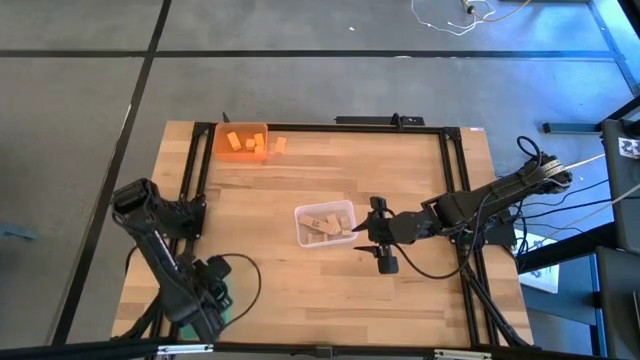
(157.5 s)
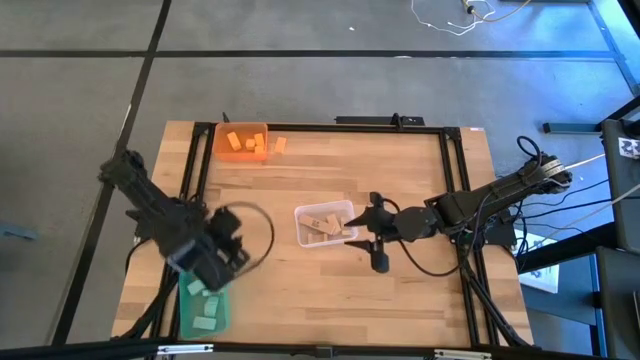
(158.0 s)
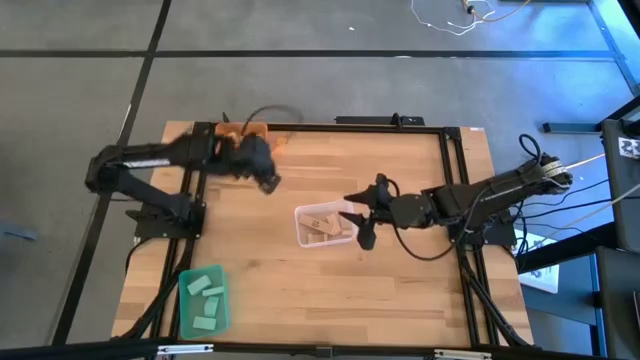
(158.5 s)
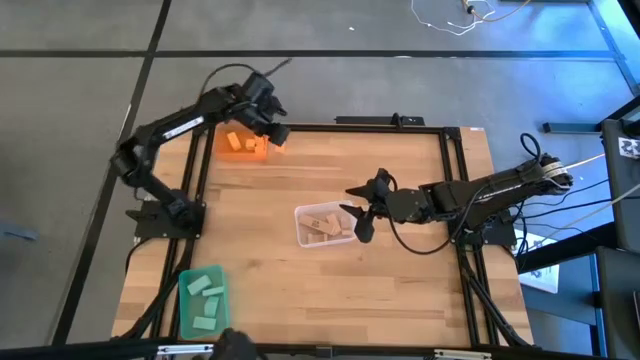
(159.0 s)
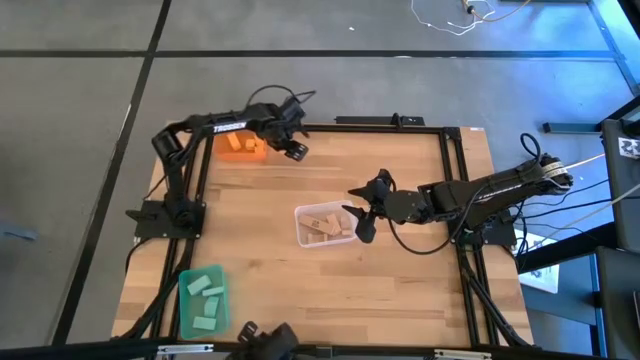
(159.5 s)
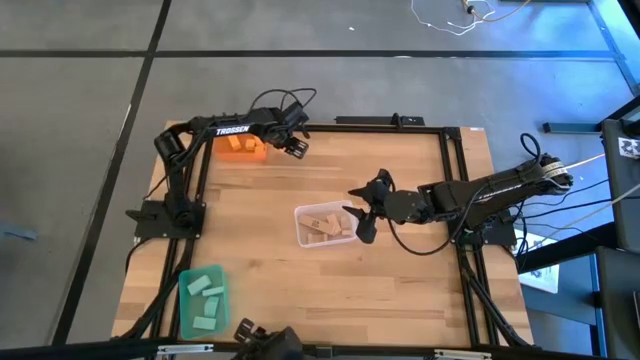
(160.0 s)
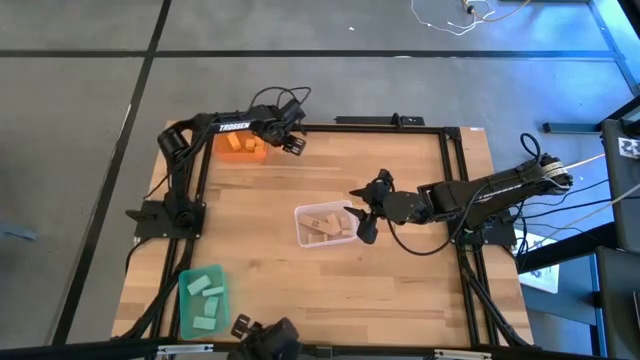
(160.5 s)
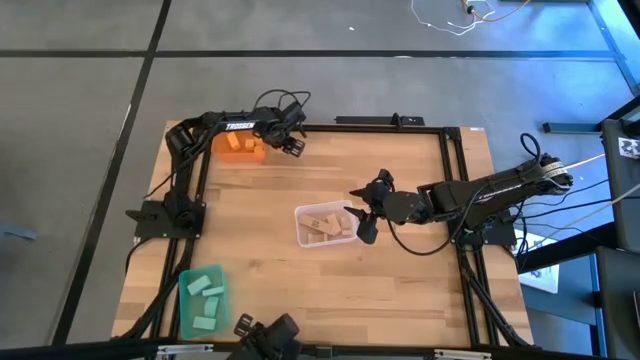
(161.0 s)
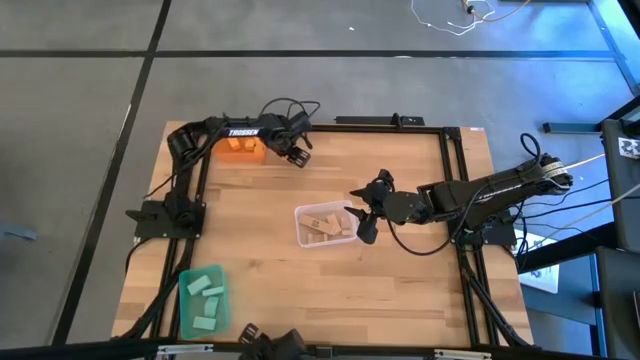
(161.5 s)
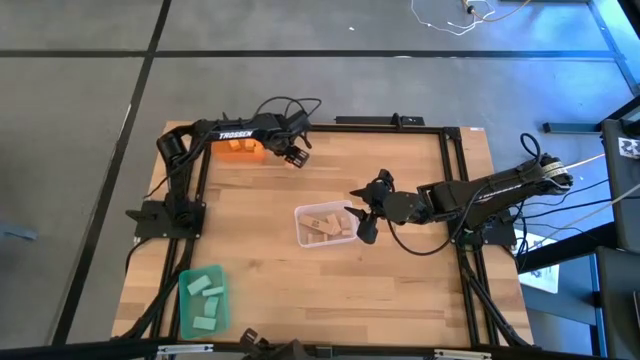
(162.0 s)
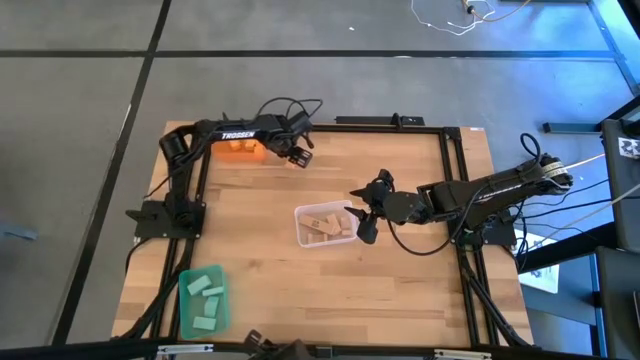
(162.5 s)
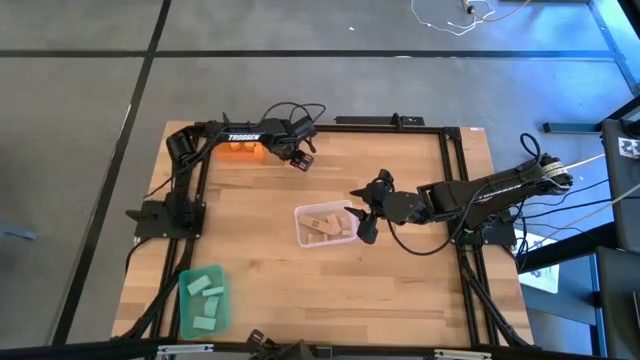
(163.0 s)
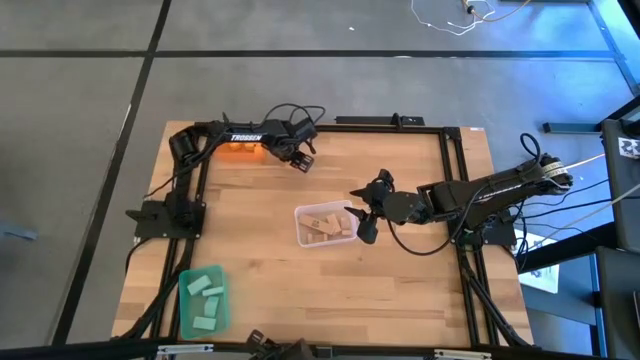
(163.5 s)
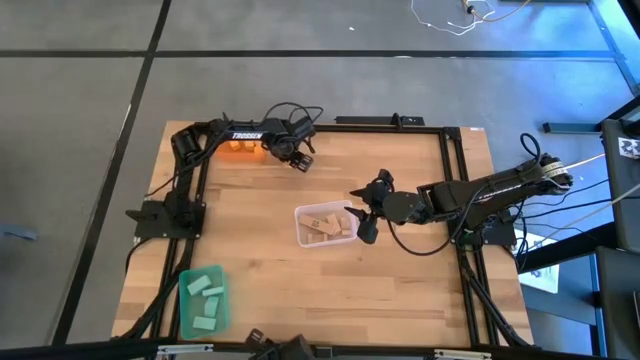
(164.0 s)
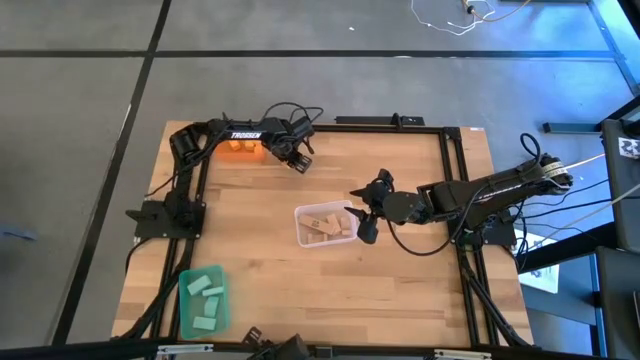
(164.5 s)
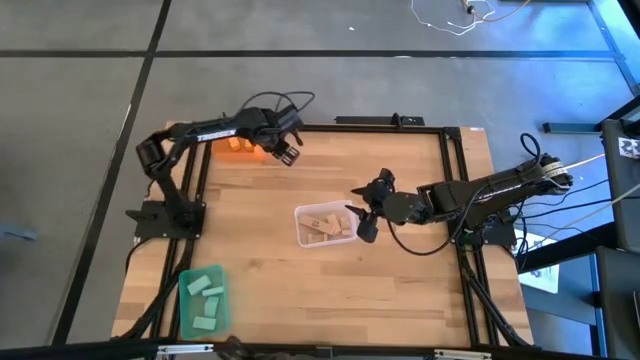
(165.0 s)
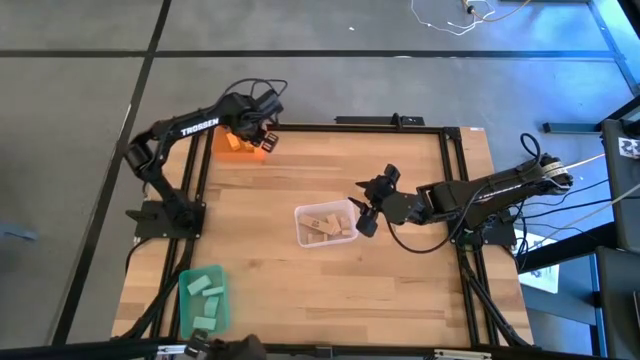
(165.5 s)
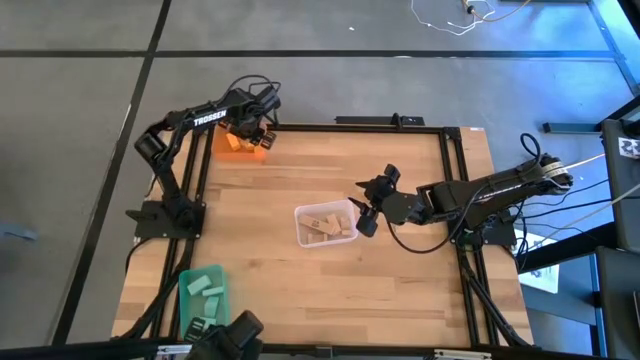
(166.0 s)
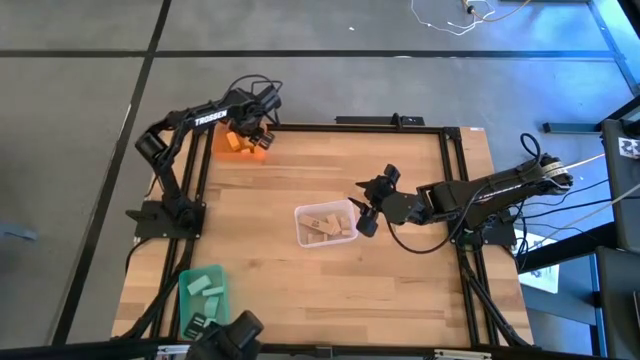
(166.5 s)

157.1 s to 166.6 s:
Task: Sort & place blocks by color
Put the yellow block into the orange bin

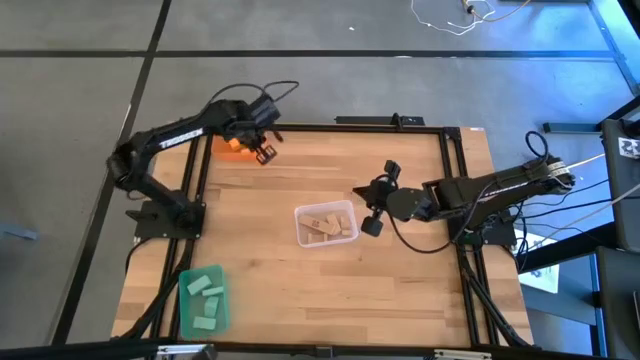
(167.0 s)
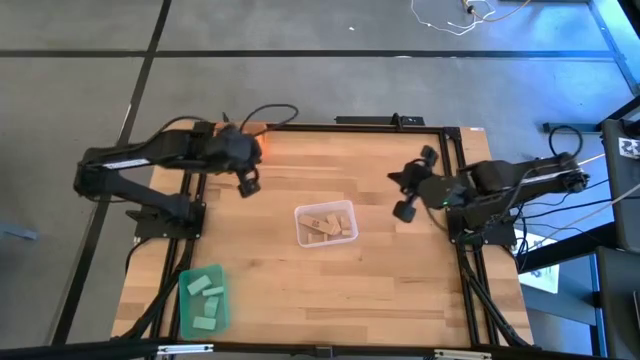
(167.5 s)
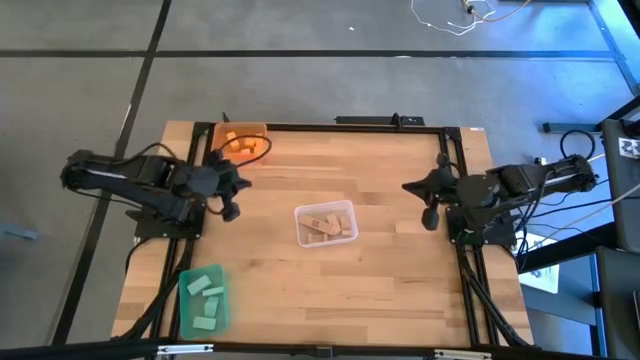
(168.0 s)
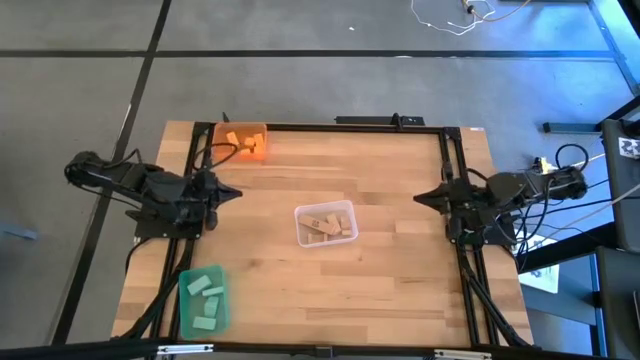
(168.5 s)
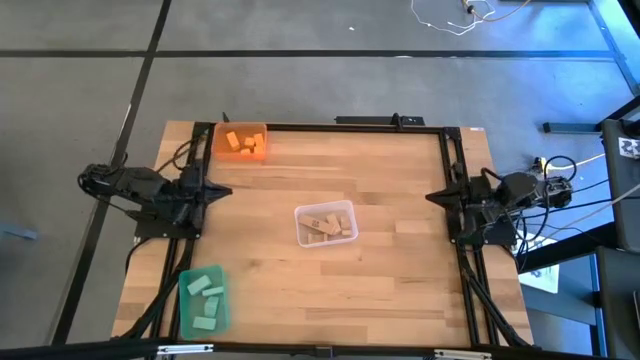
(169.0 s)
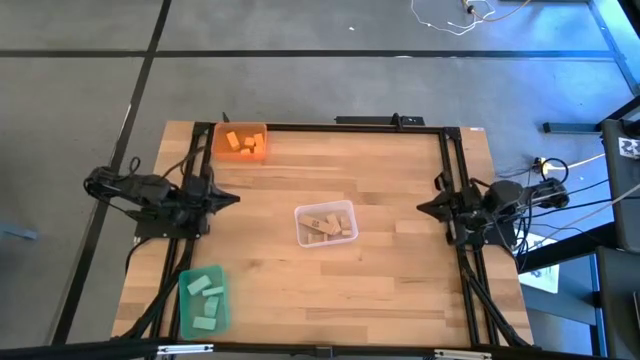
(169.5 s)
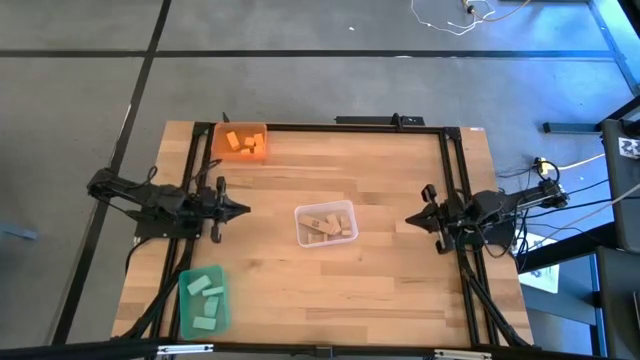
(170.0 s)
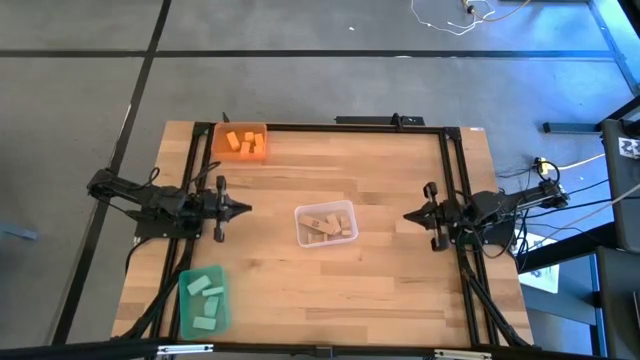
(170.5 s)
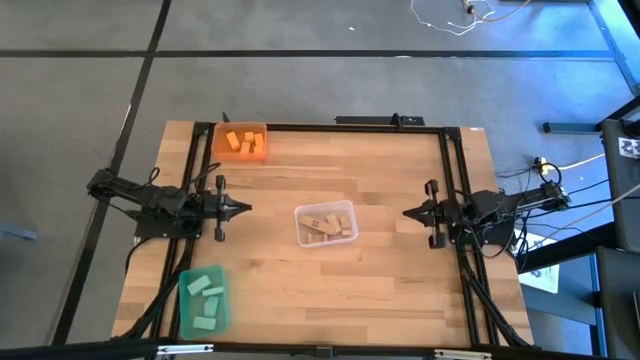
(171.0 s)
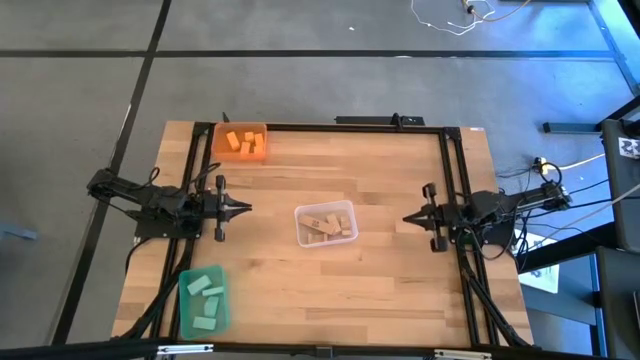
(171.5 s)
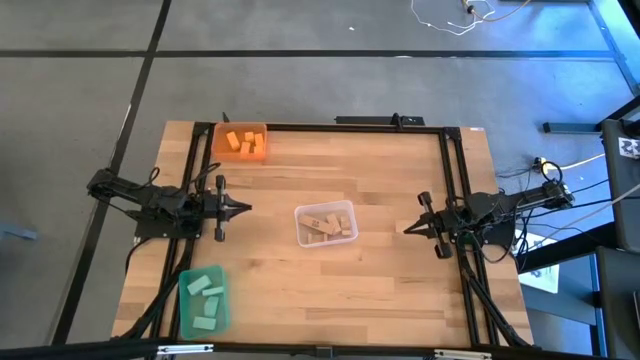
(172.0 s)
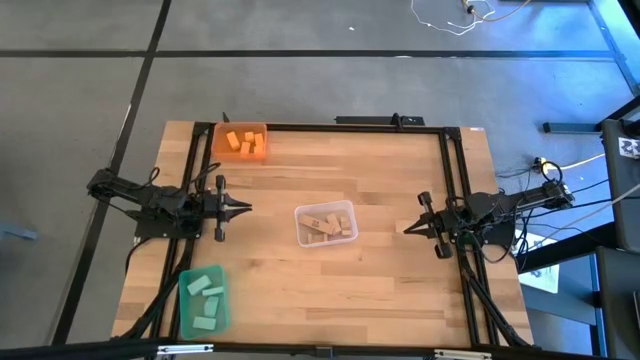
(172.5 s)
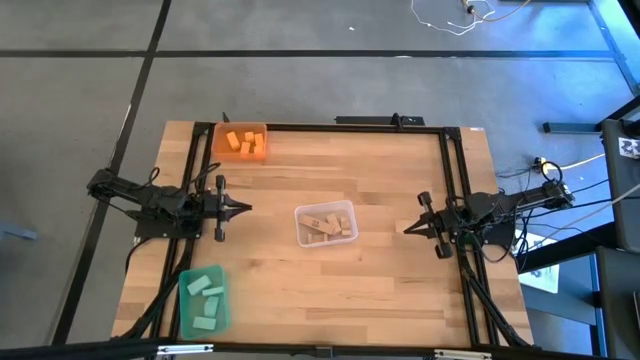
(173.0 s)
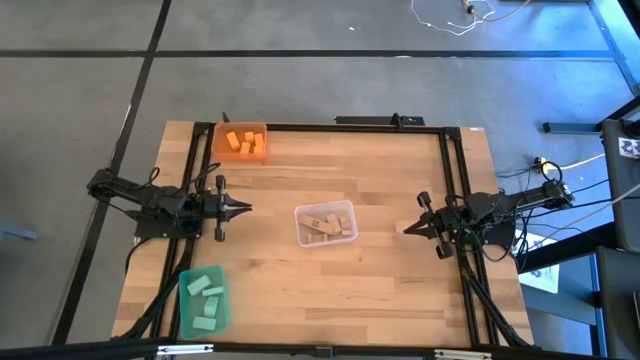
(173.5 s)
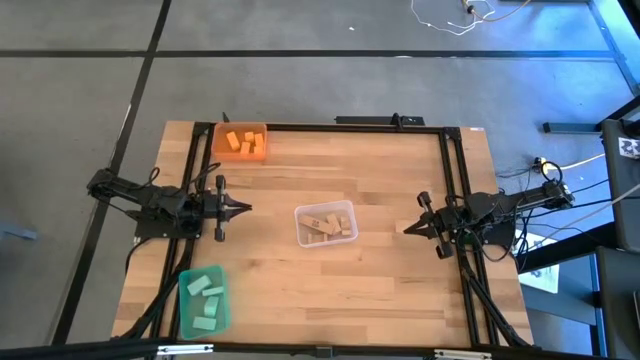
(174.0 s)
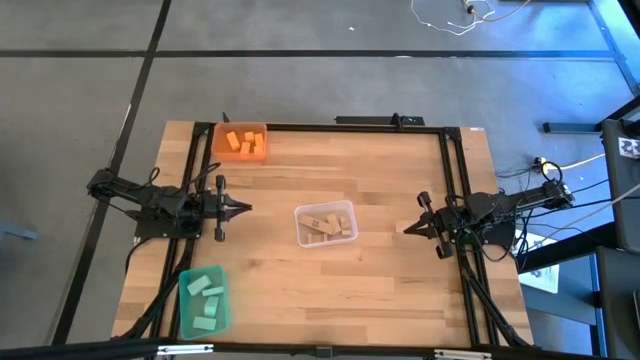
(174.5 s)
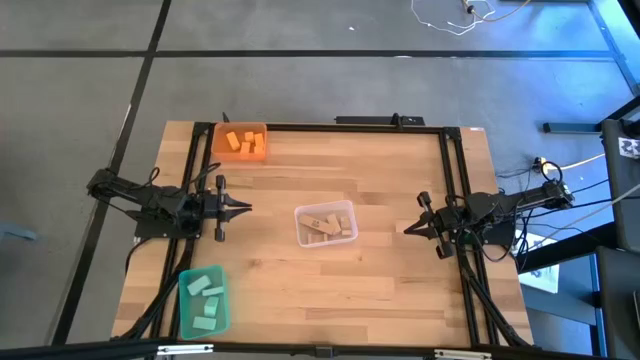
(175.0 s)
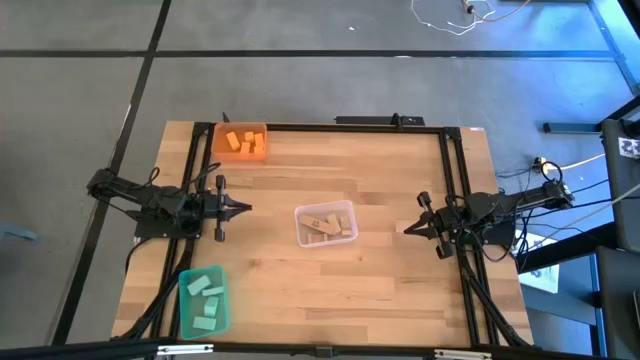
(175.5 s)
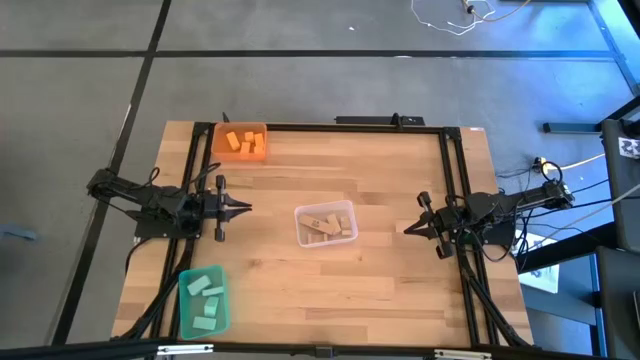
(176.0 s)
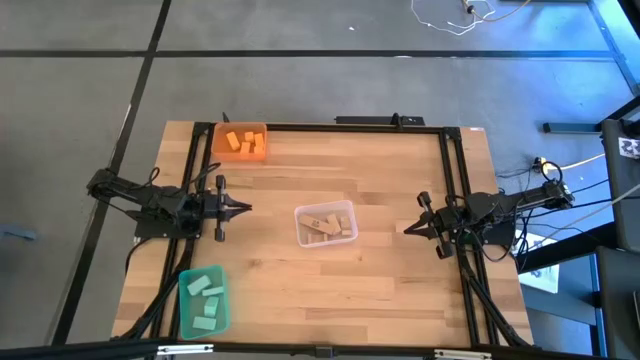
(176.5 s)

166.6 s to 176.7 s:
Return to Home Position

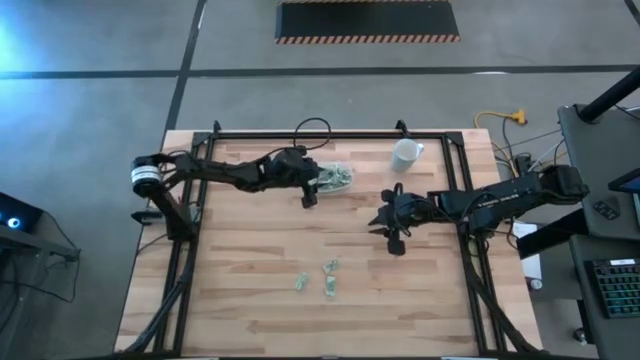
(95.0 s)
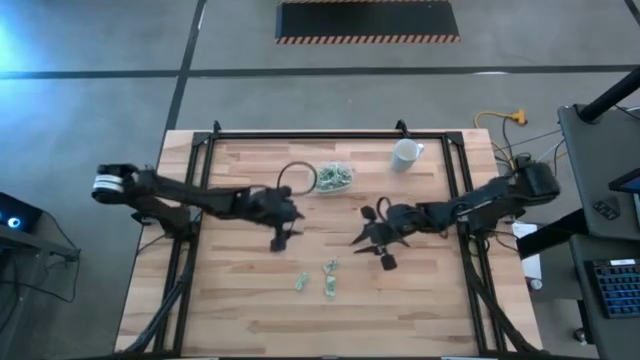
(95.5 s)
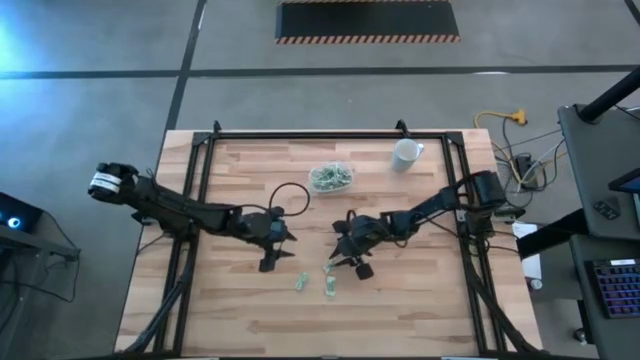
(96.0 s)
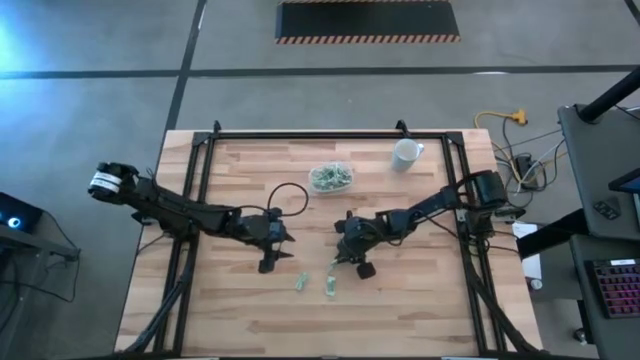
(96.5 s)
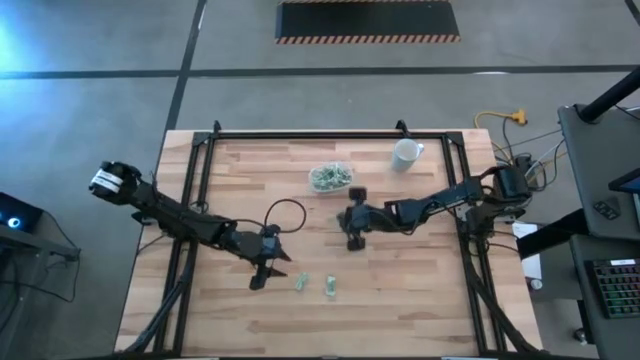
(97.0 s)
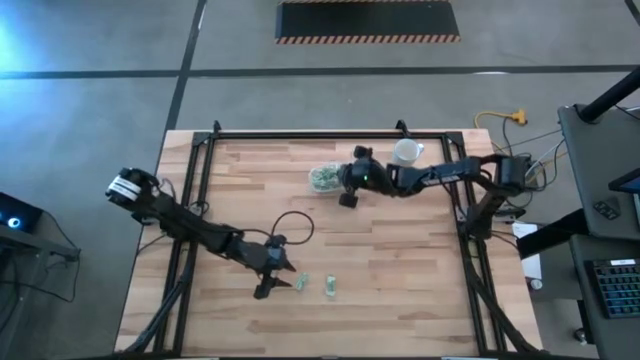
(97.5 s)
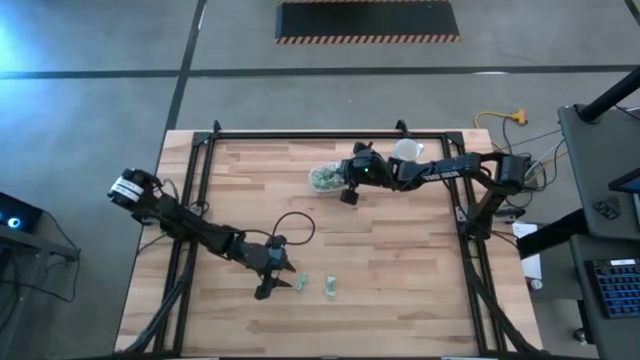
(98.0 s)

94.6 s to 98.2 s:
Task: Pick and place Stevia / Truvia into bins
Put the stevia packet into the transparent container
